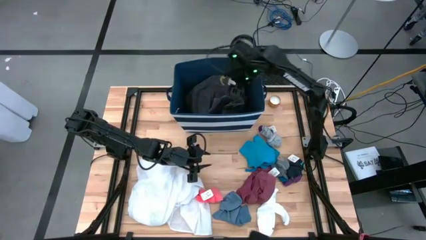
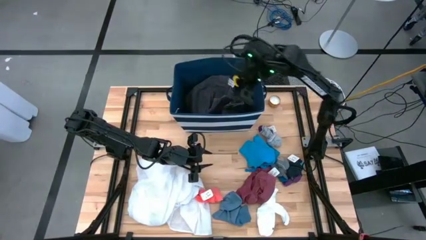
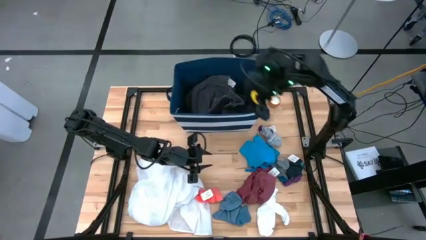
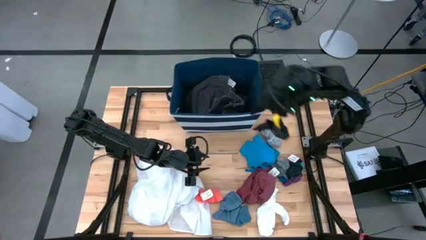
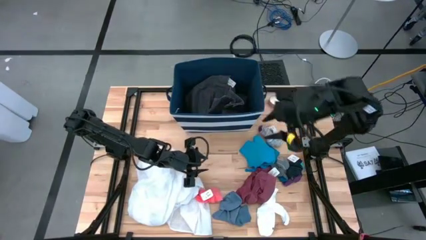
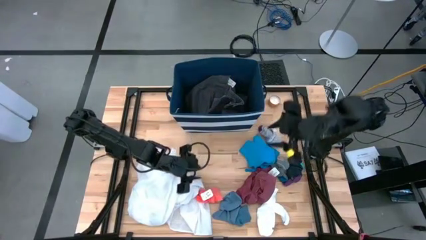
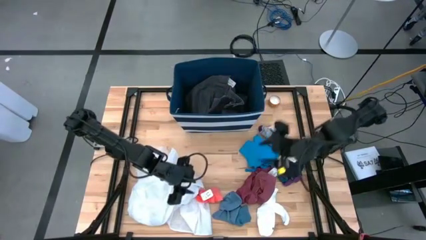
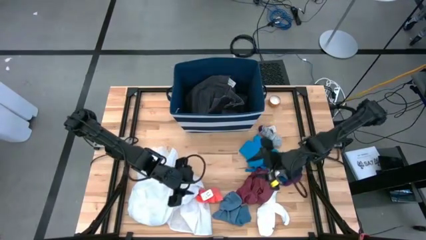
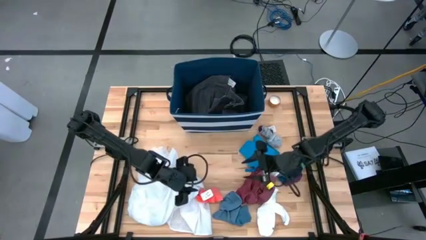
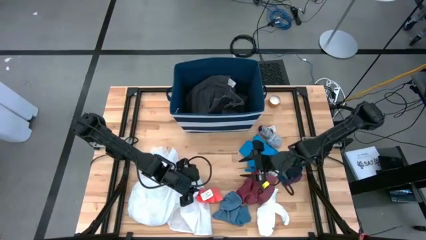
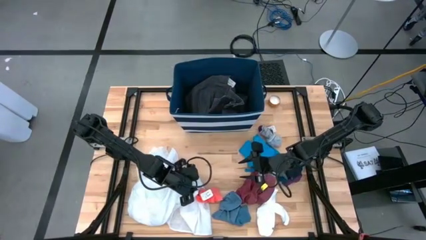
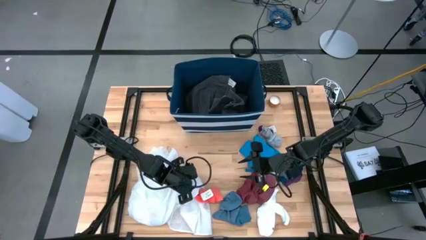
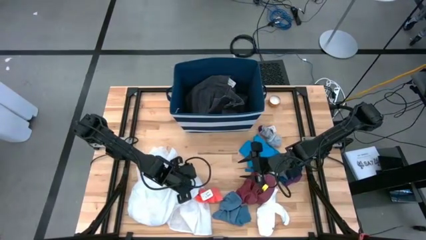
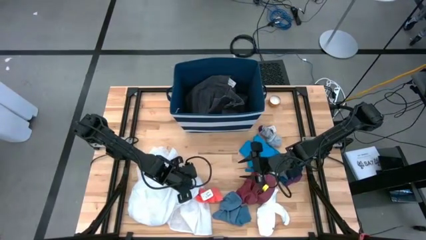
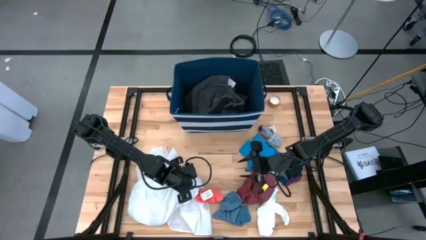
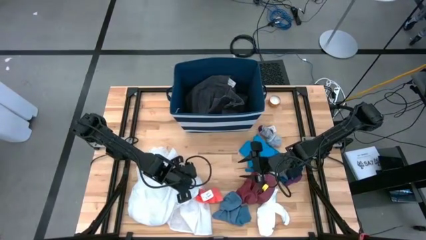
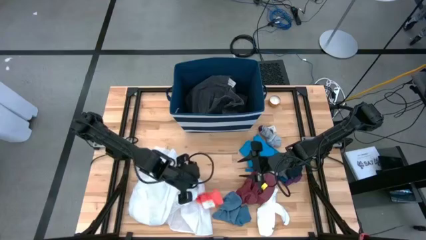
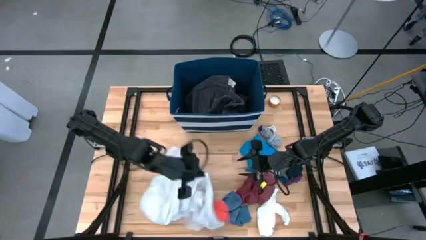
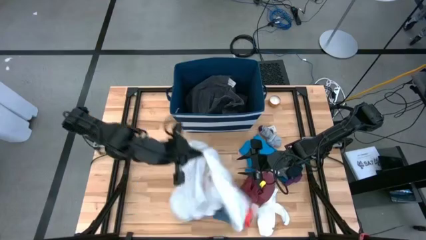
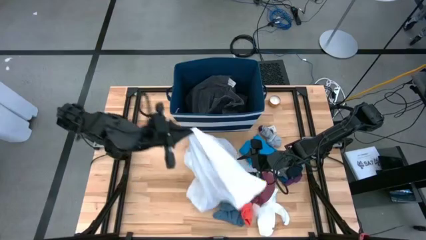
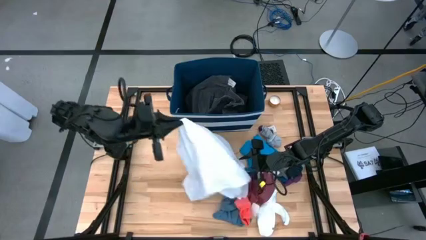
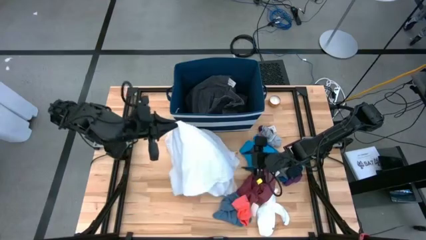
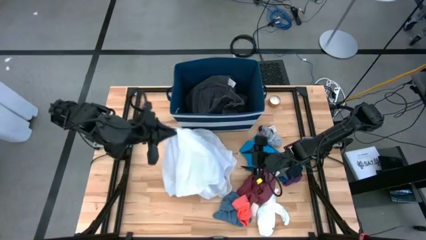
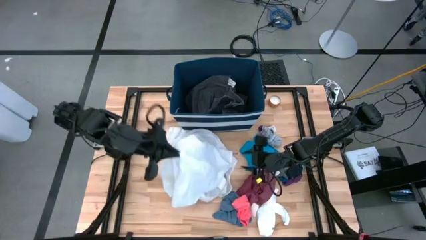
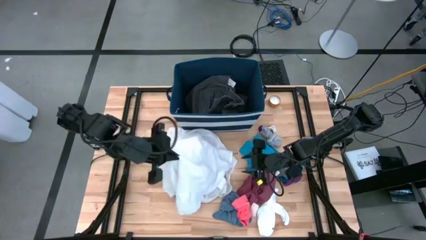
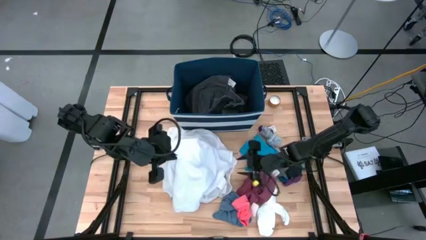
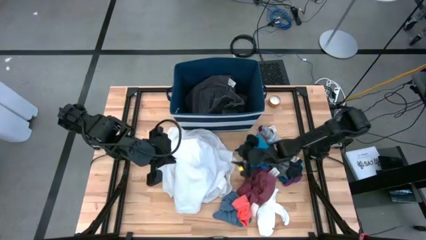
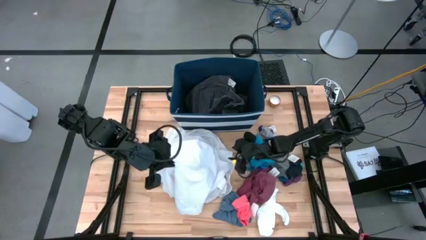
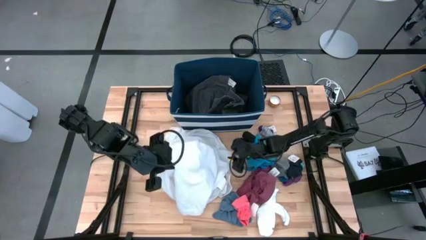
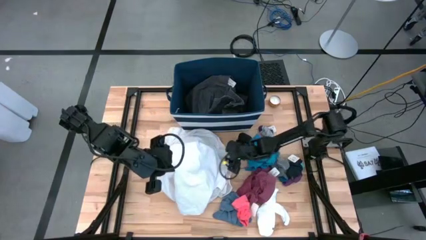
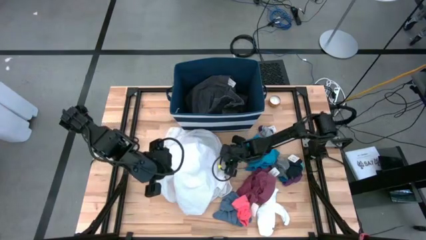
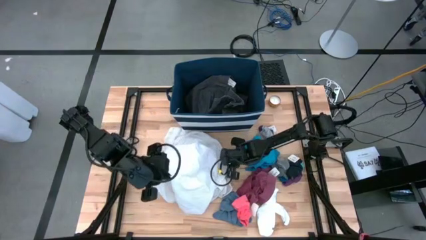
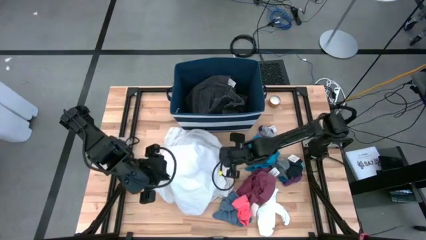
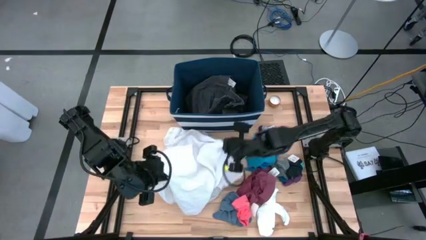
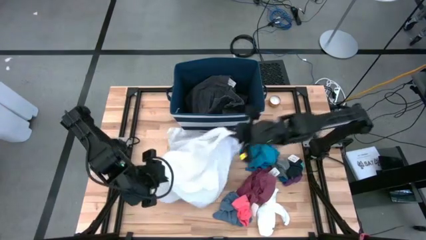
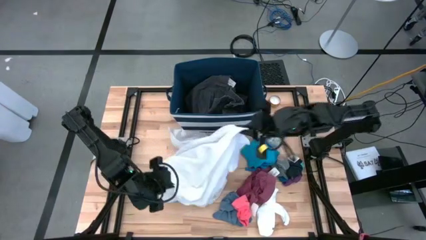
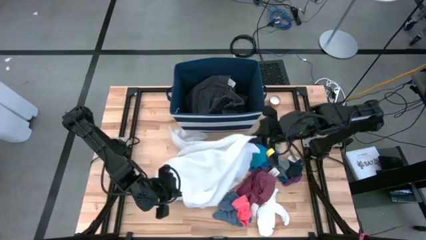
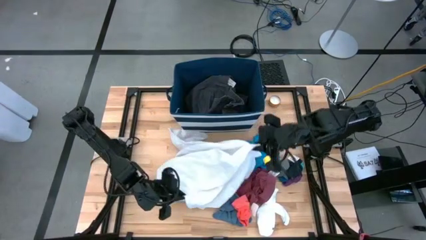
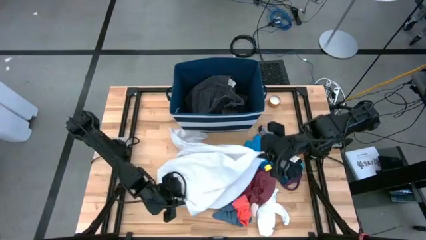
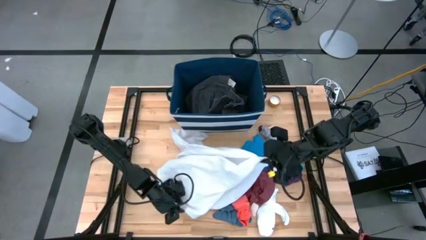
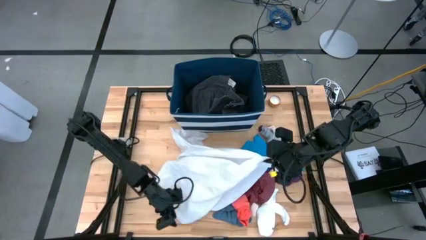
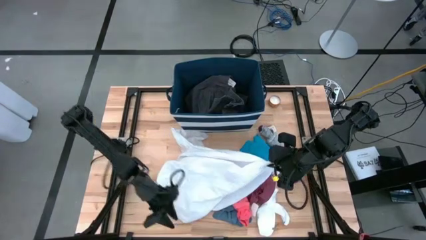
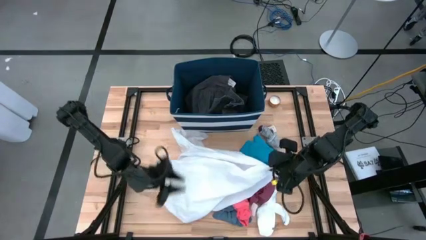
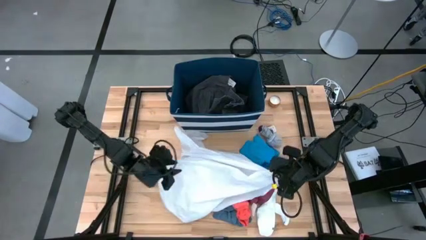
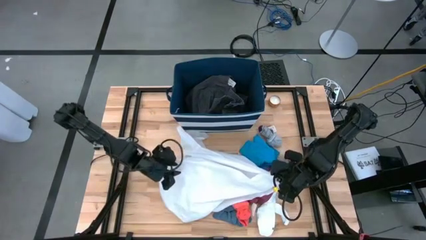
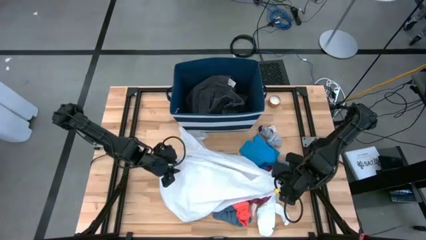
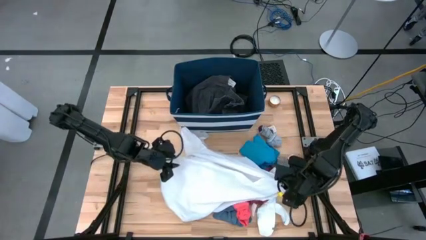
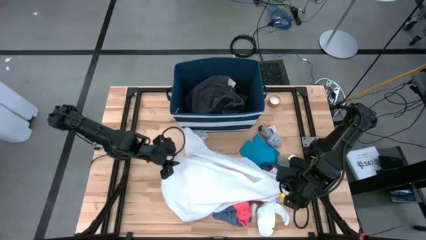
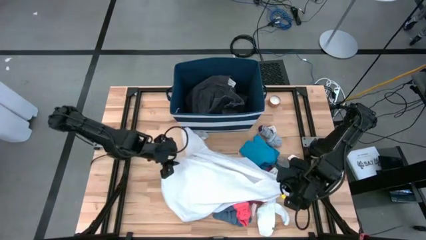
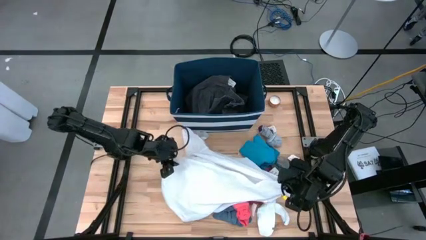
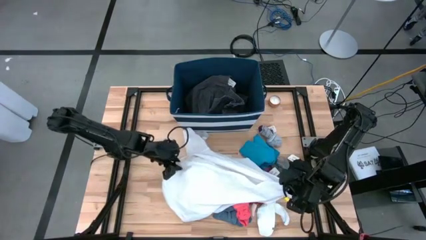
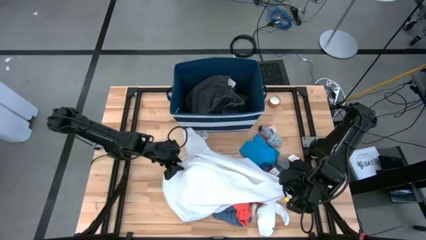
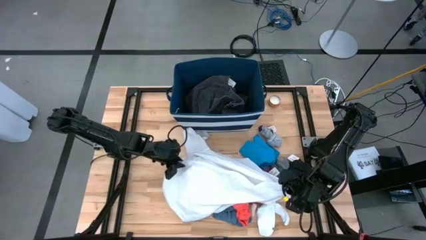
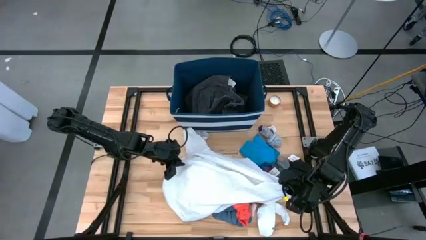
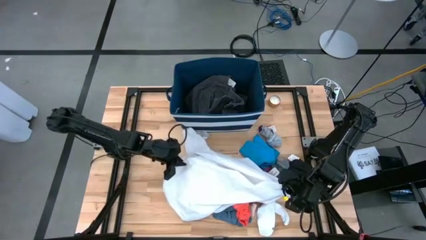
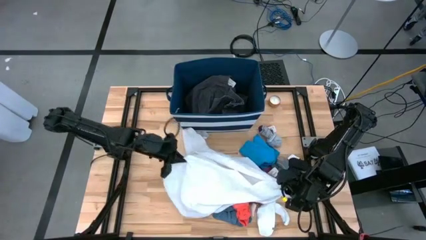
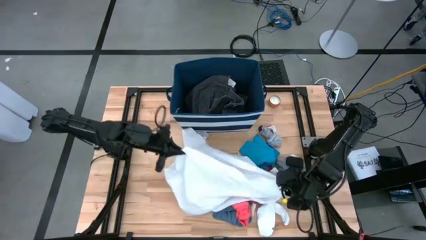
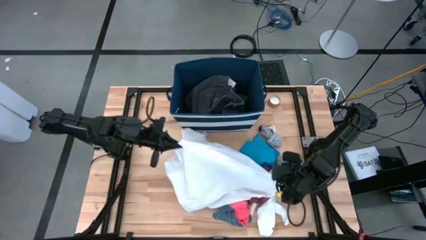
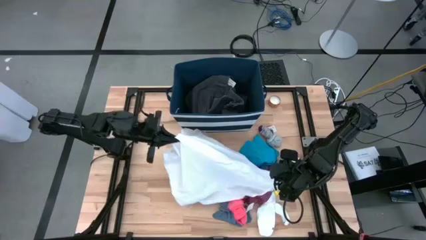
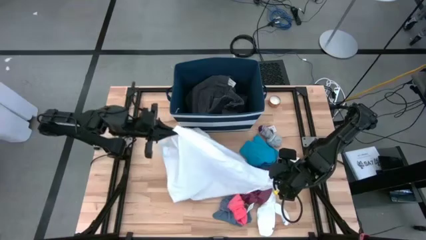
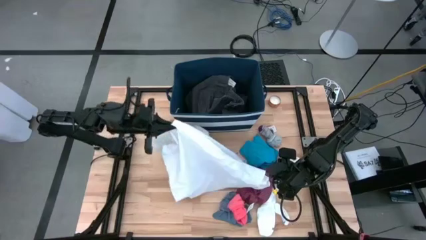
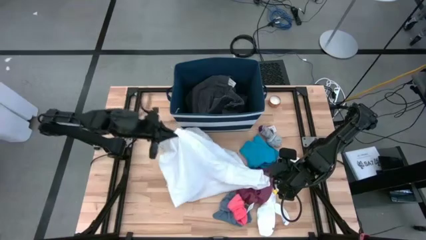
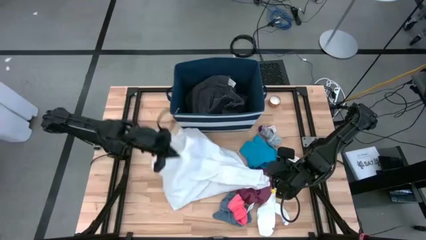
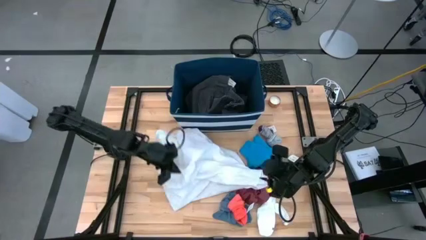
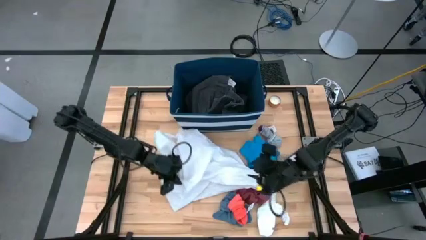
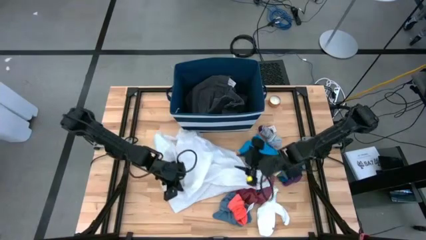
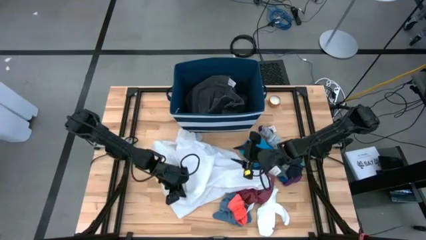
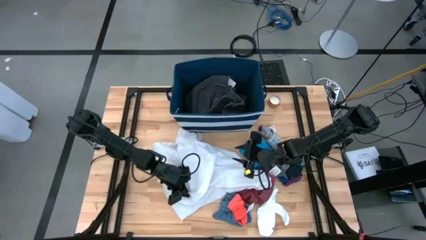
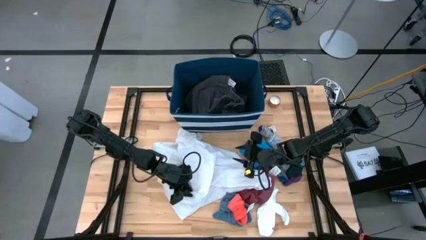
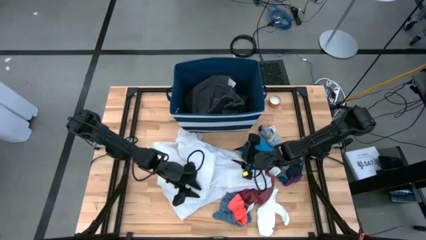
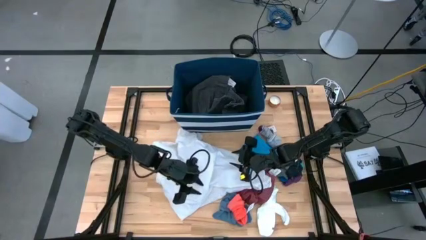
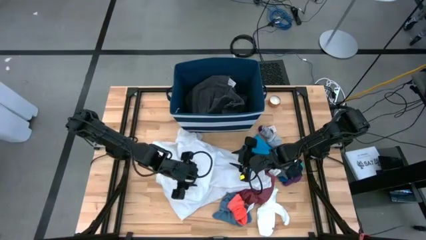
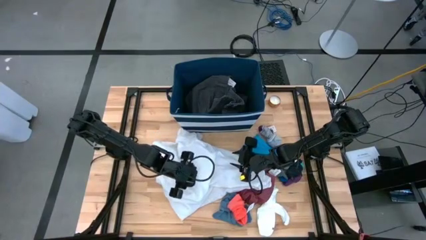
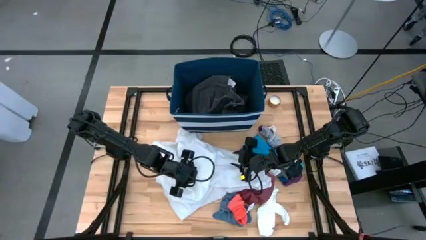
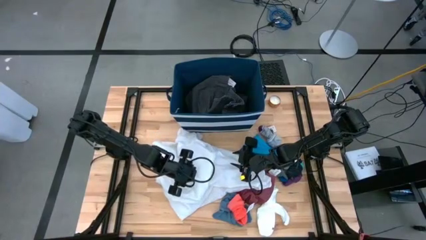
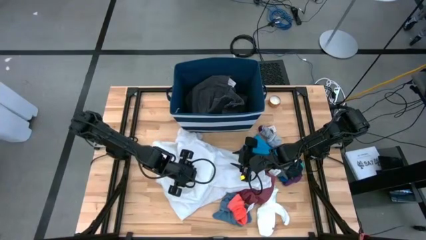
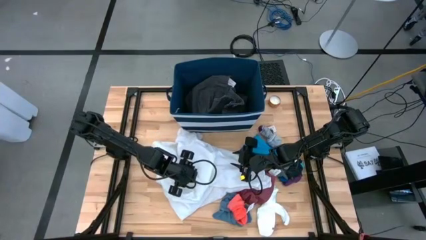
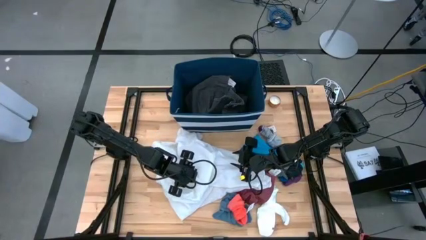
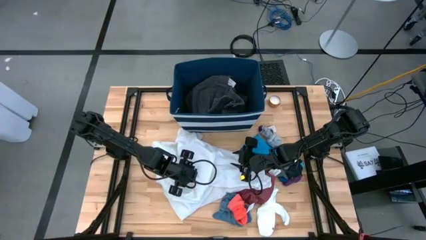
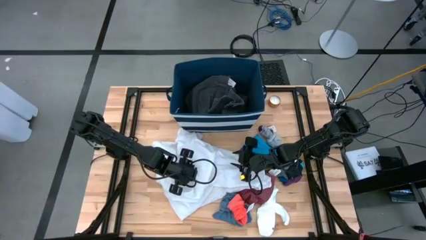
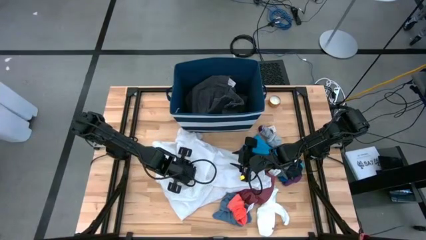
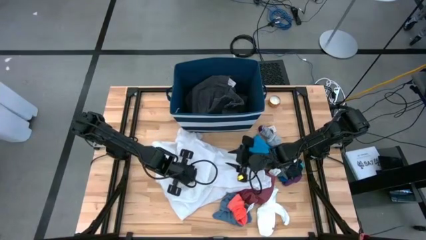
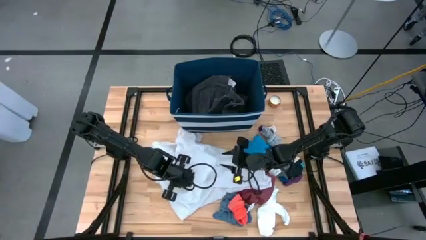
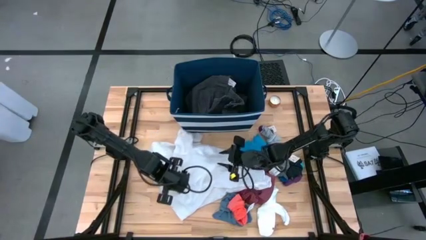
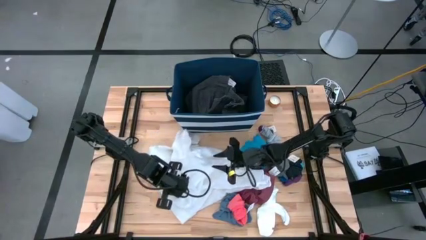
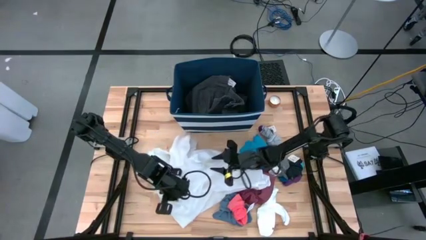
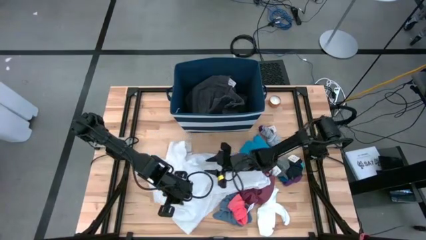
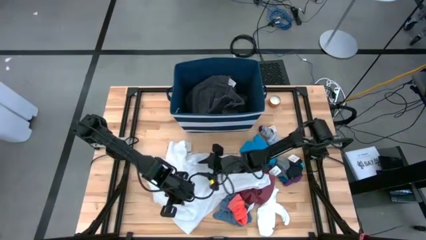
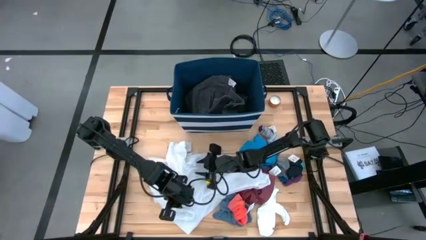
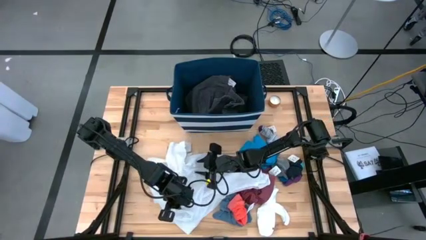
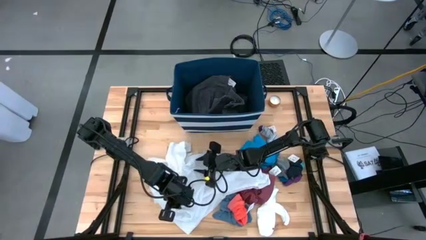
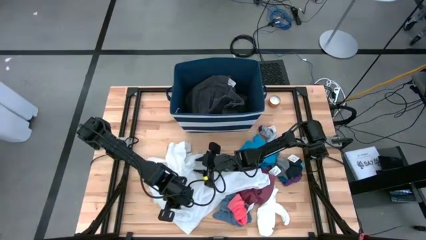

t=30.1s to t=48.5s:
Task: Sort clothes
Put the white polo shirt into the blue laundry organizer
